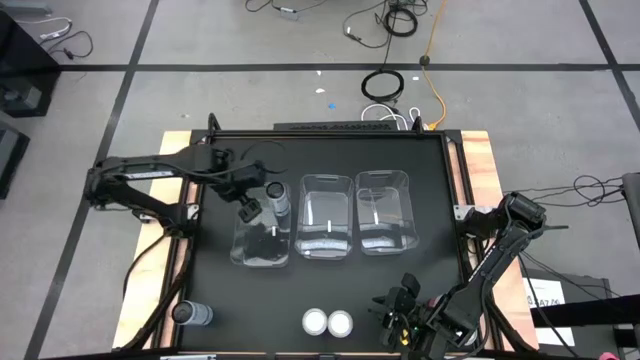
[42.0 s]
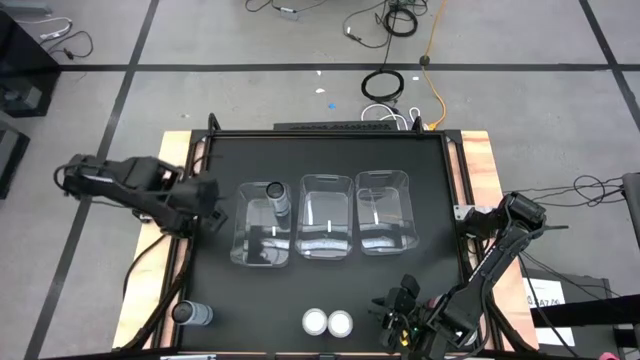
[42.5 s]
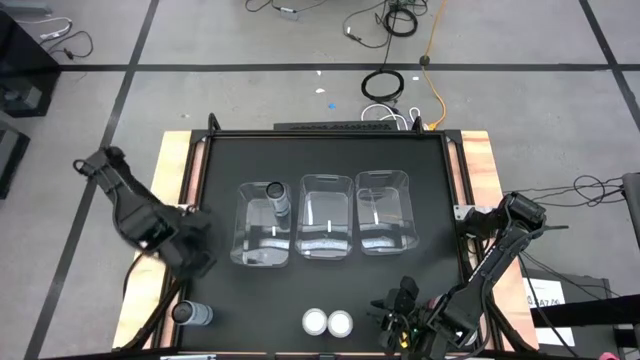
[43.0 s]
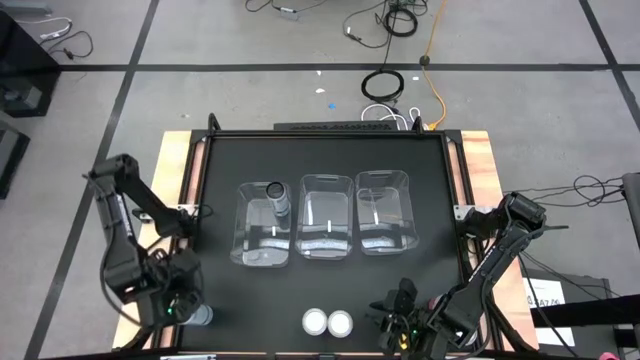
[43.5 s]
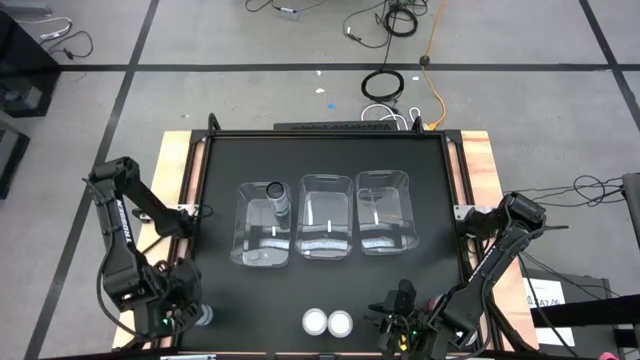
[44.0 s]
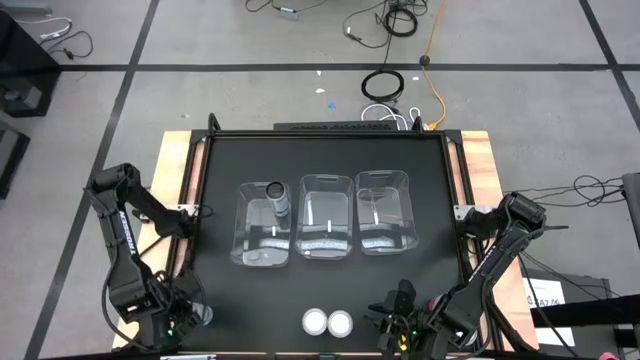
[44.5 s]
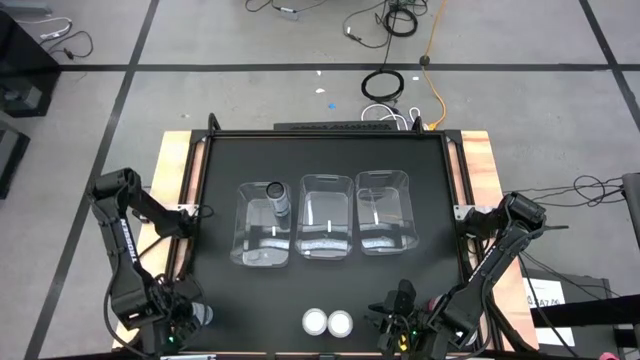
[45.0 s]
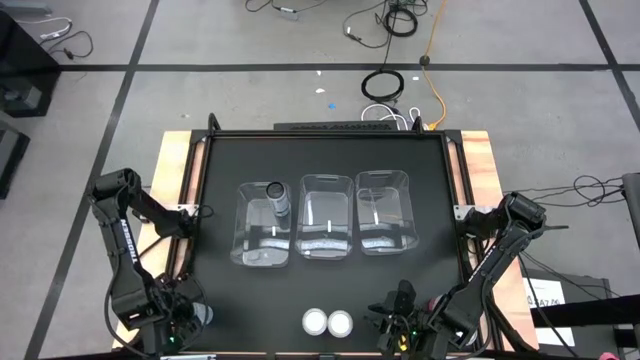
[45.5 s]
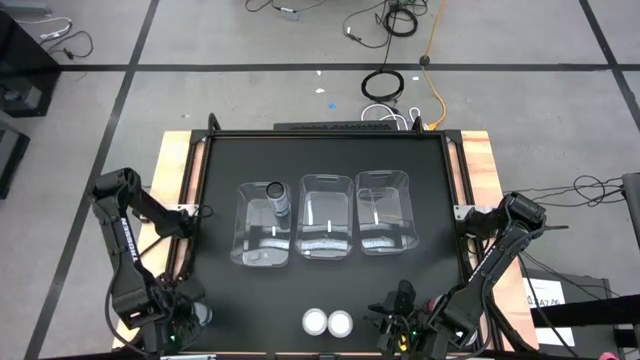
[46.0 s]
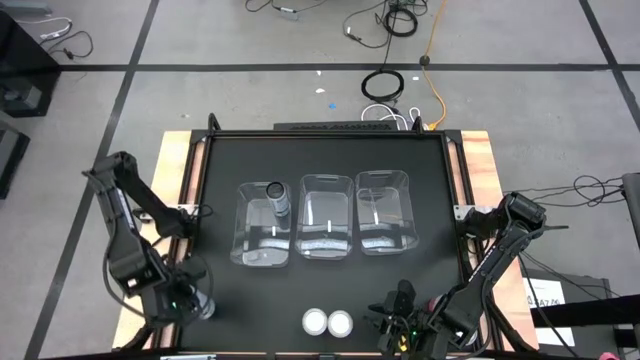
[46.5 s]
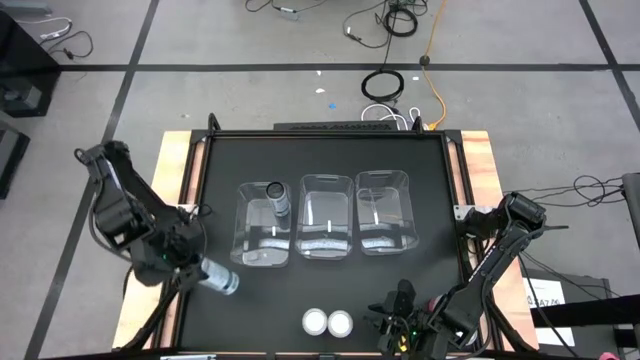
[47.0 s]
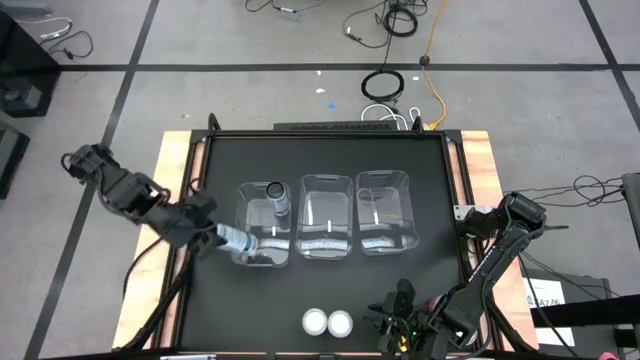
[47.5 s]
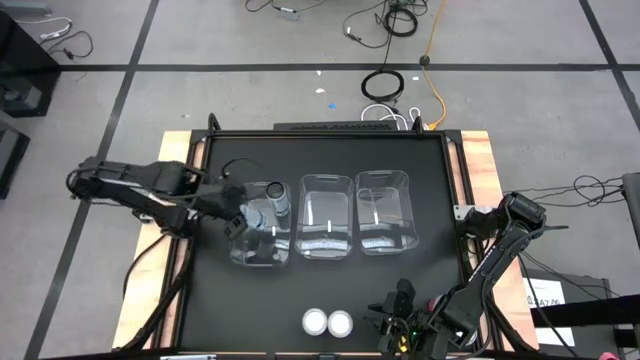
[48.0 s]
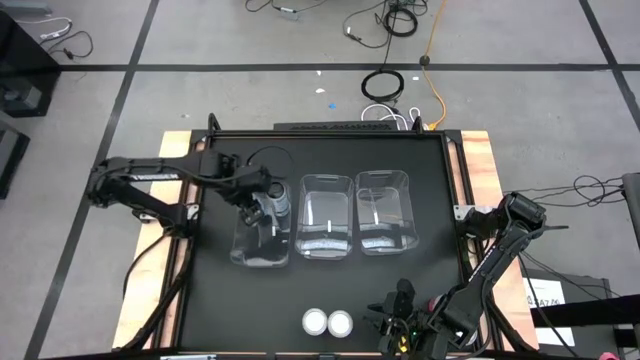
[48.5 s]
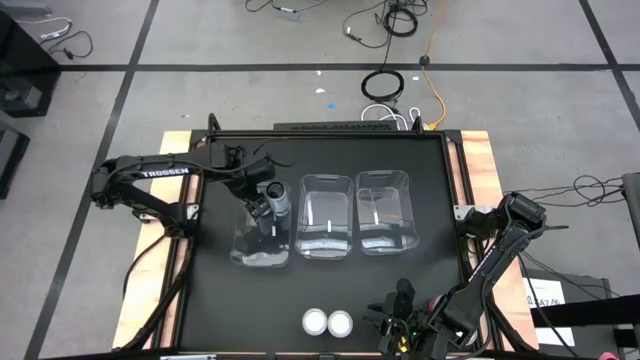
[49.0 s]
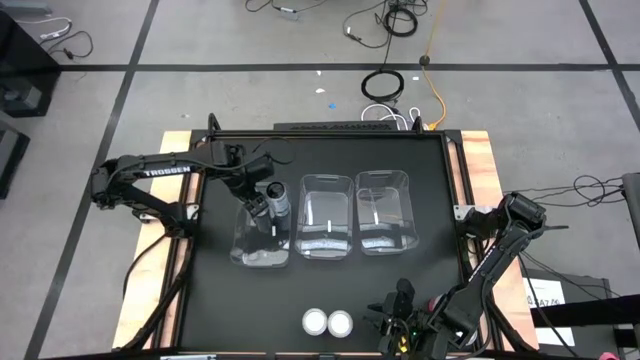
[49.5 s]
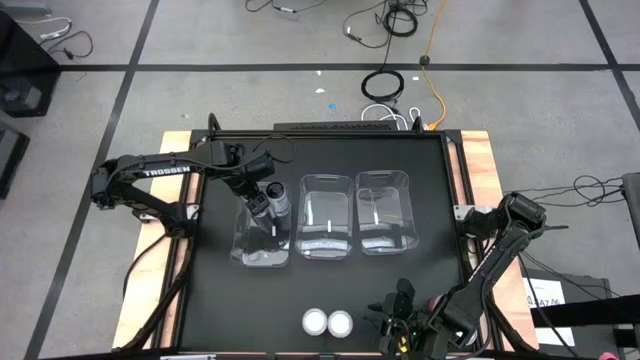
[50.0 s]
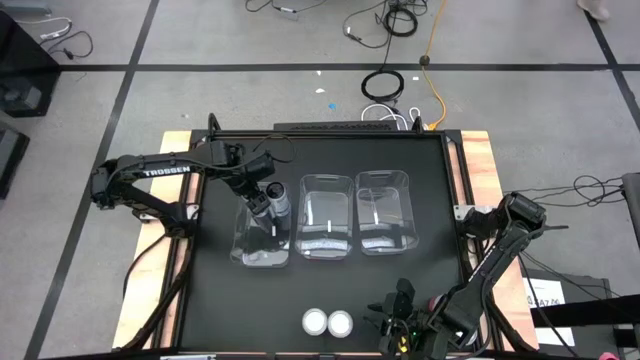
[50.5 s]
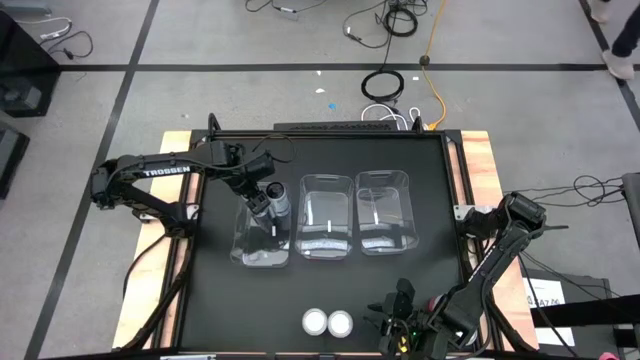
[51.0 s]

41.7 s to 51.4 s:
Task: Sort soda cans
Put the white soda can into the left transparent bin

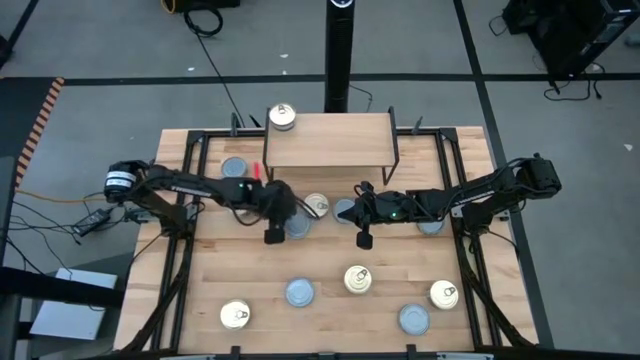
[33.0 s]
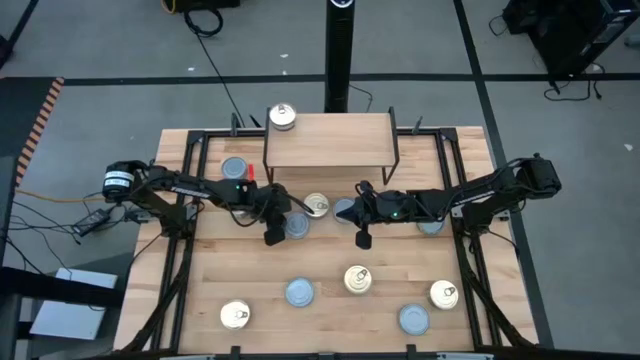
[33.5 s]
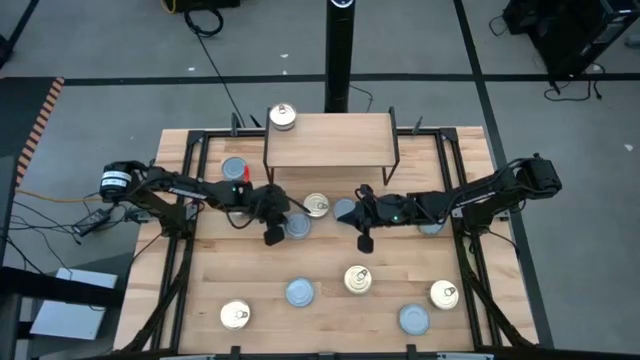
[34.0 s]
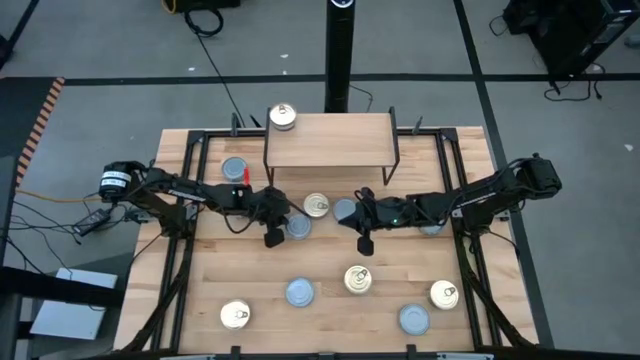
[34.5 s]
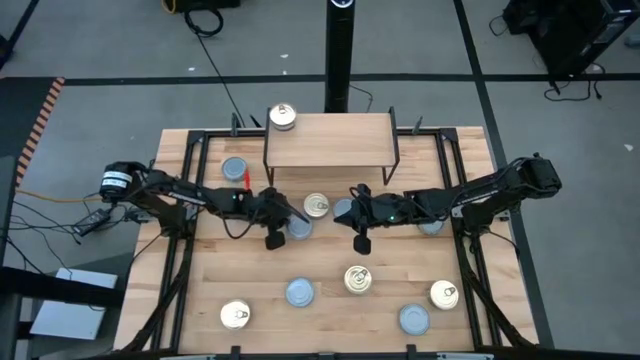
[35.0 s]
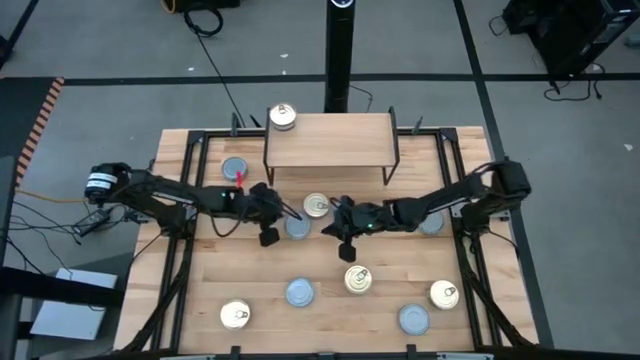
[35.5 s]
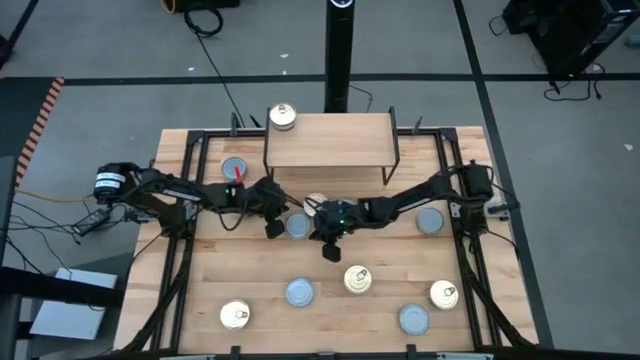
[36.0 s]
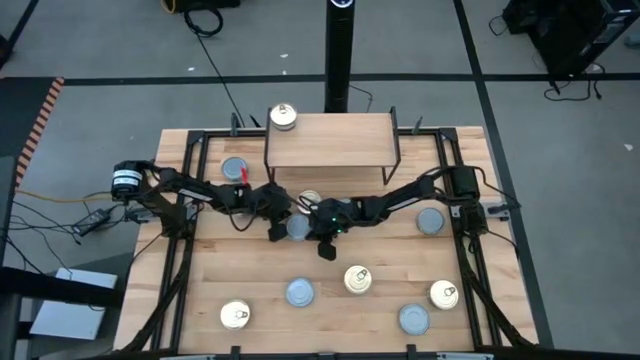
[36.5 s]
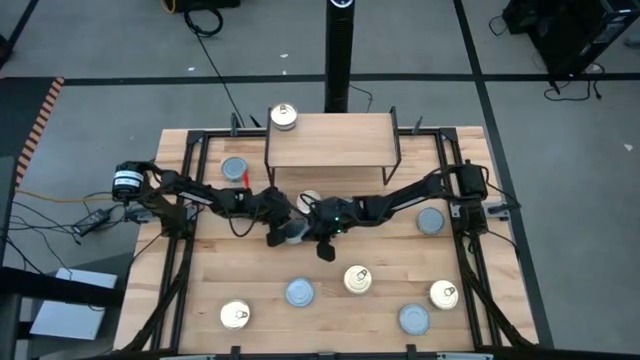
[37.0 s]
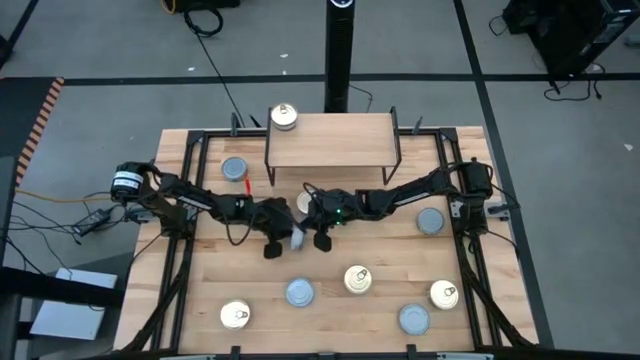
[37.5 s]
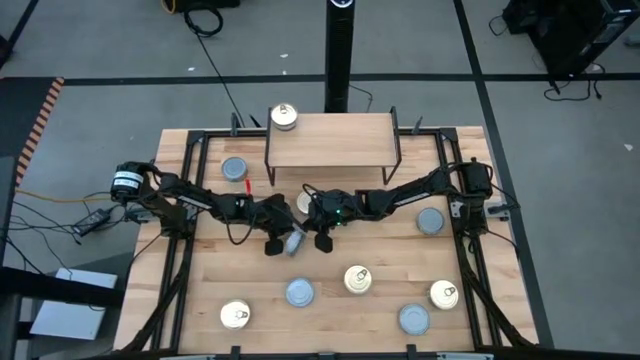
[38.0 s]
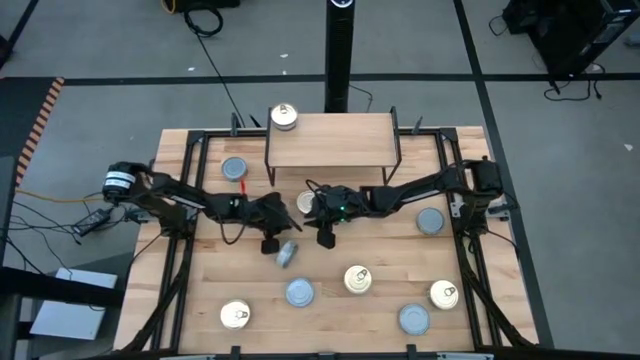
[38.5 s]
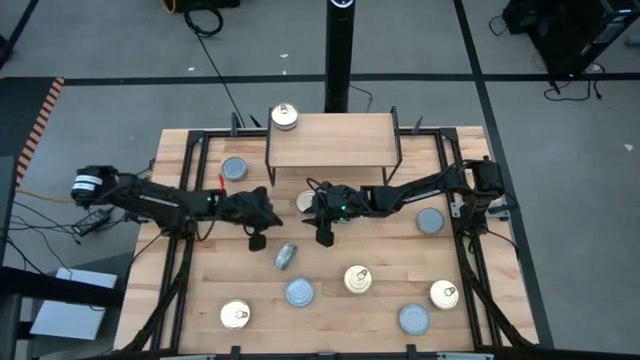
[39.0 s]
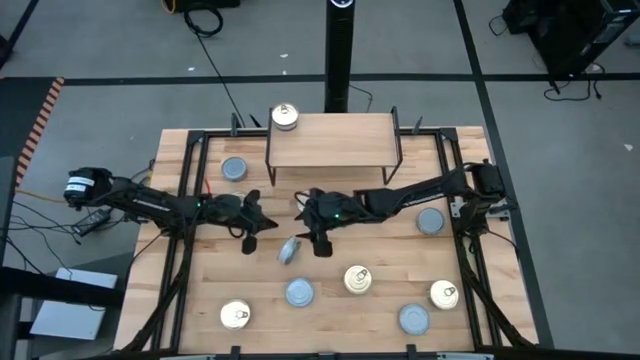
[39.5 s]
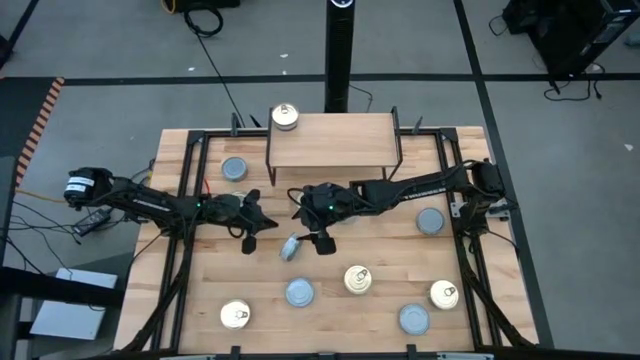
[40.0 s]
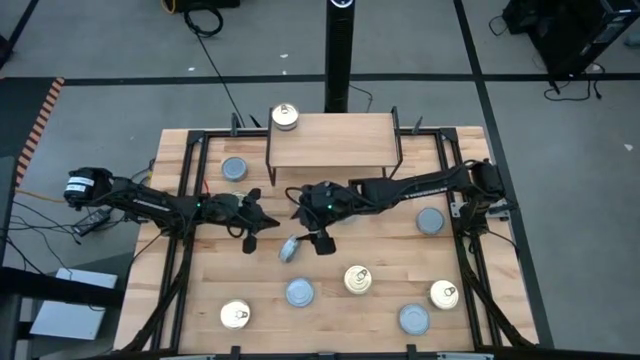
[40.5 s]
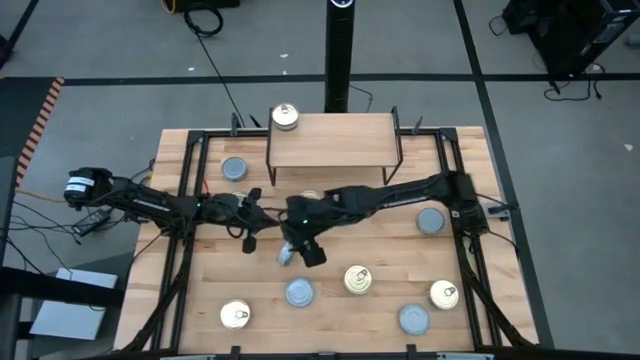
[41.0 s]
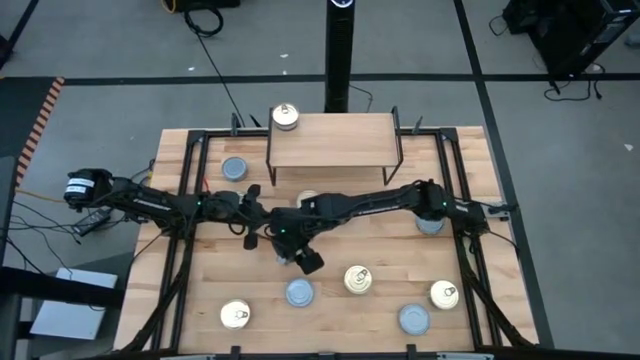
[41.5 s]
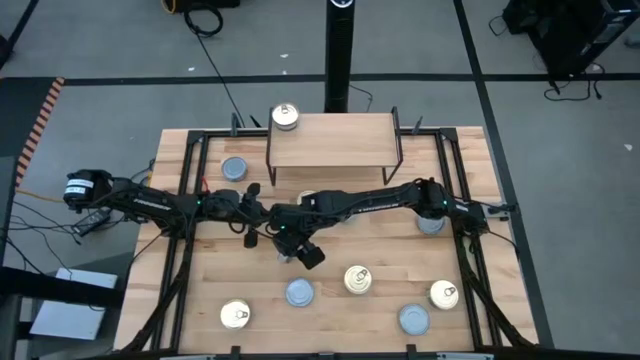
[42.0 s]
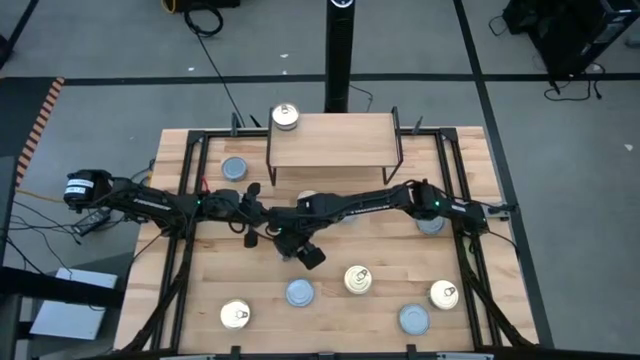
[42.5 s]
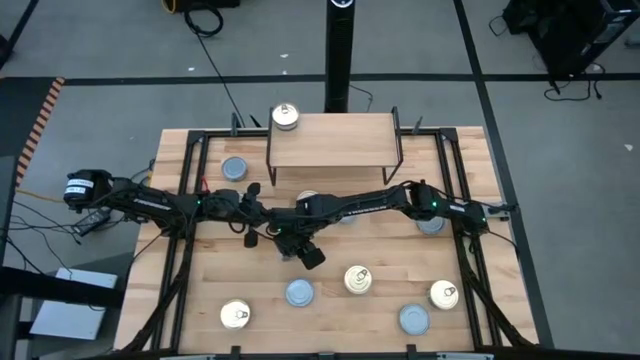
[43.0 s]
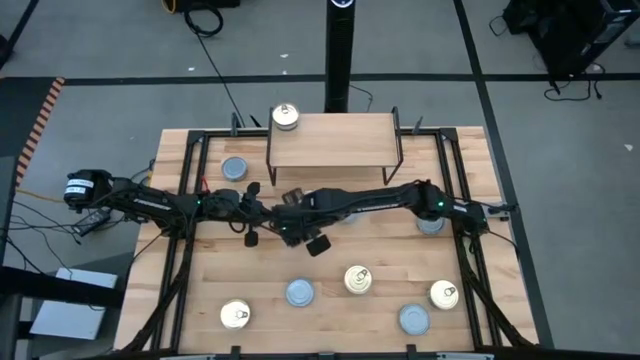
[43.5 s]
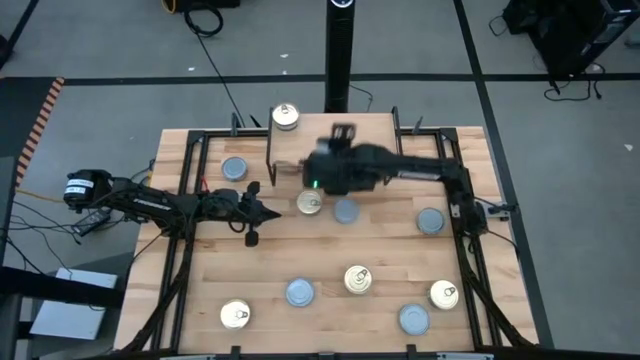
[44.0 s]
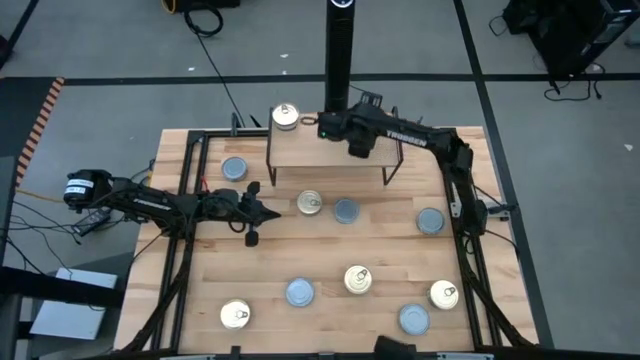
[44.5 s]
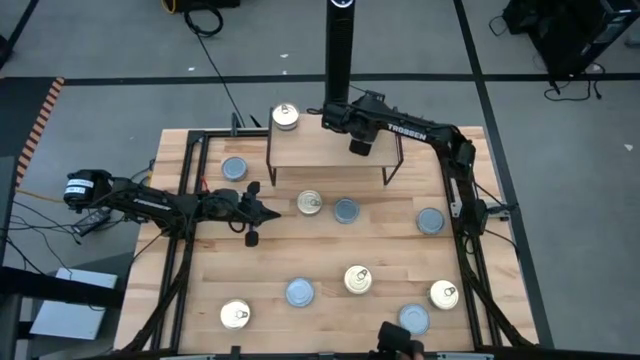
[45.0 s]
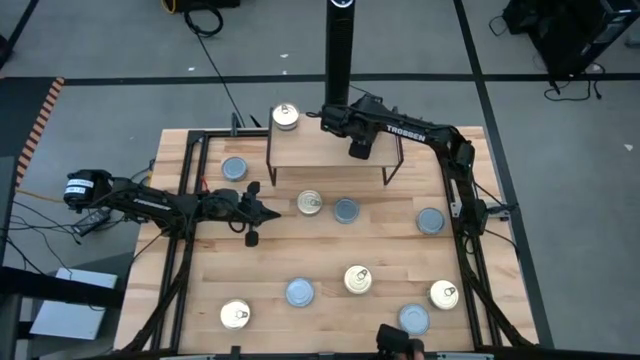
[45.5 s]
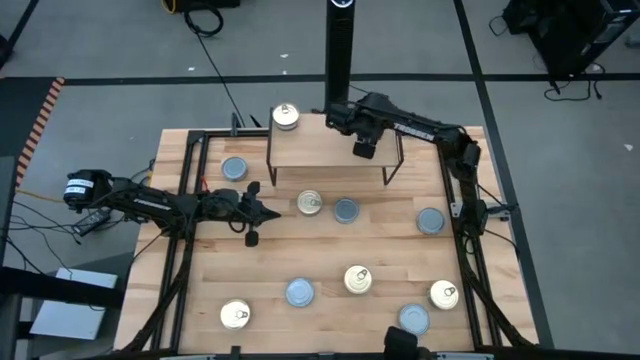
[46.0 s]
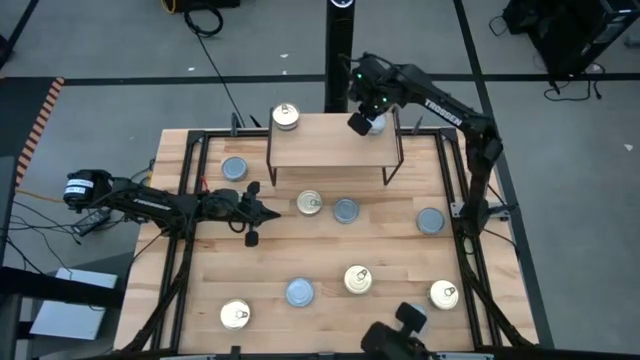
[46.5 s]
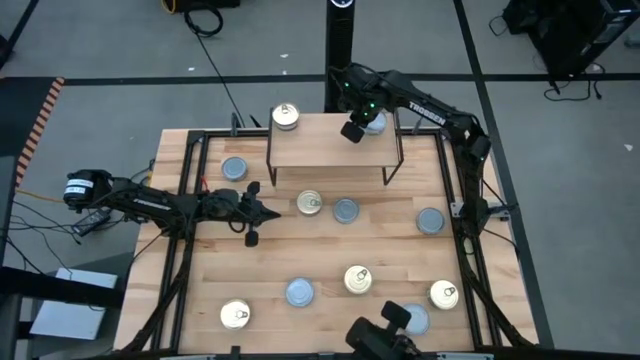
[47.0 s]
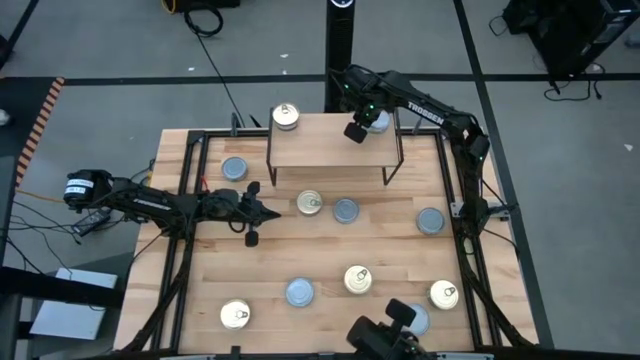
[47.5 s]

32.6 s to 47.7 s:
Task: Stack canned seafood by type on shelf
Put the green tuna can on the shelf
